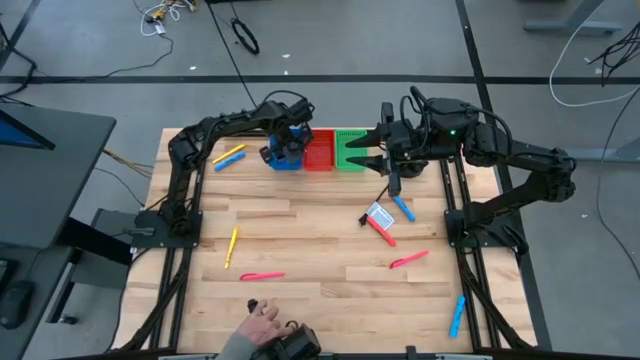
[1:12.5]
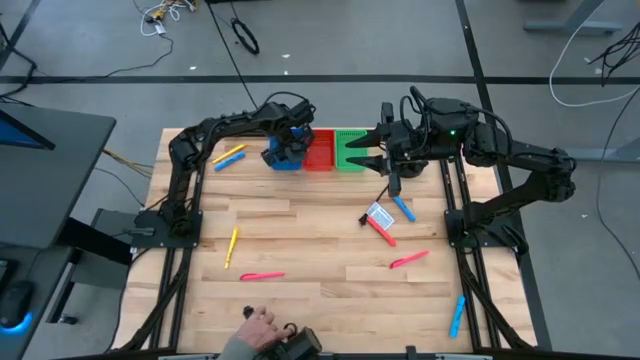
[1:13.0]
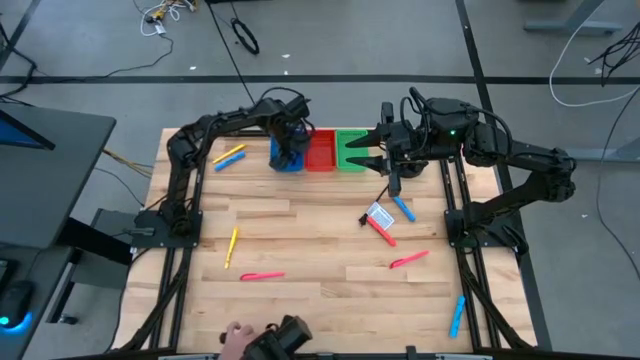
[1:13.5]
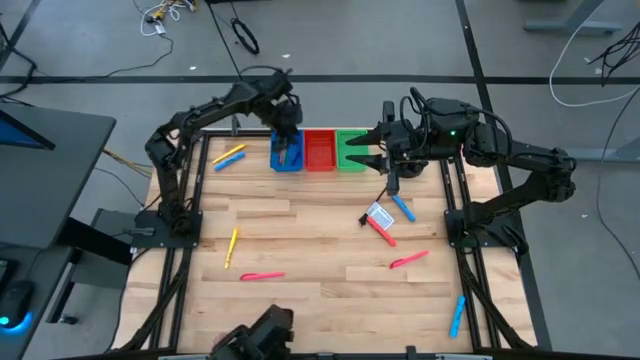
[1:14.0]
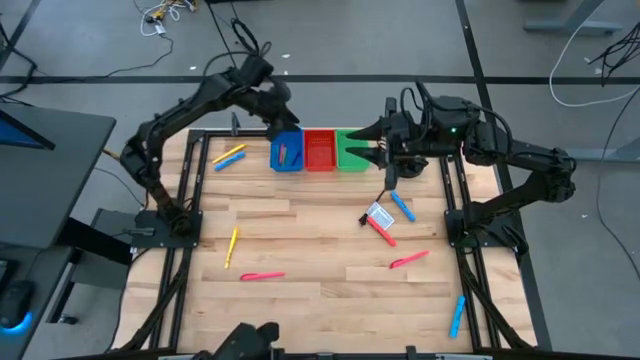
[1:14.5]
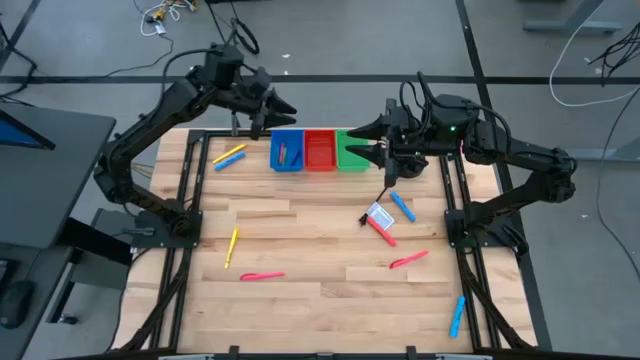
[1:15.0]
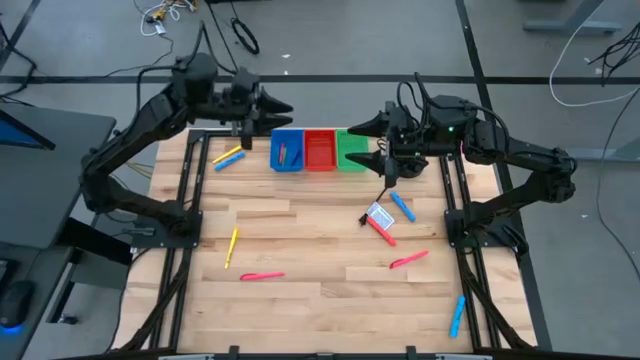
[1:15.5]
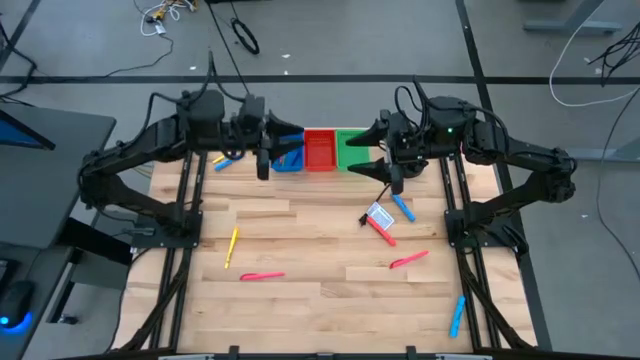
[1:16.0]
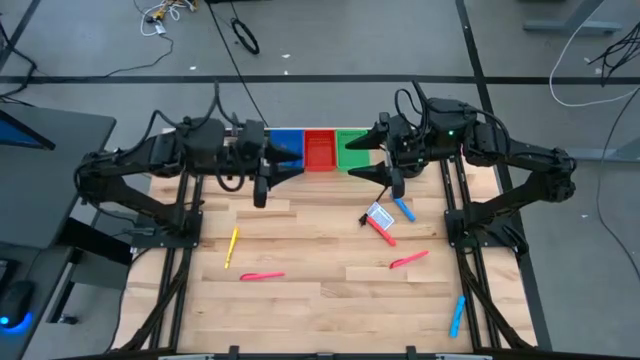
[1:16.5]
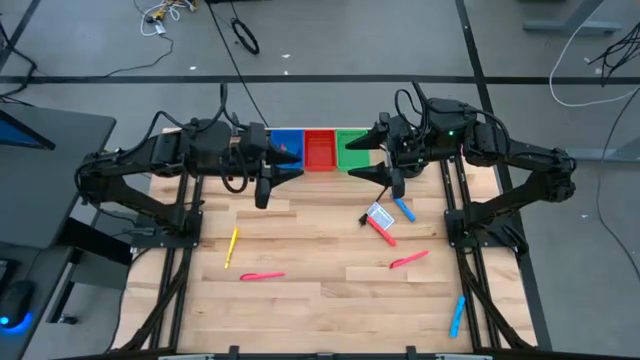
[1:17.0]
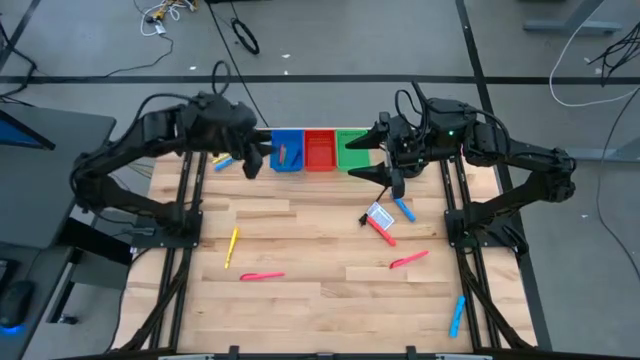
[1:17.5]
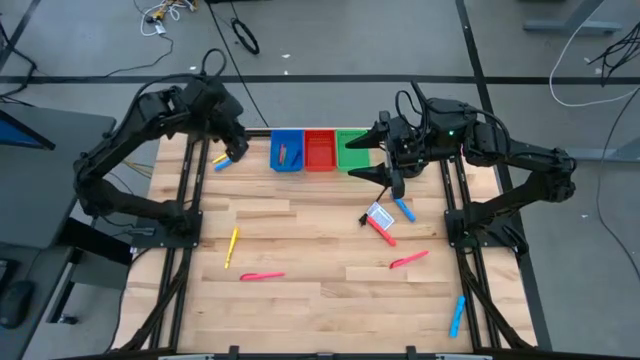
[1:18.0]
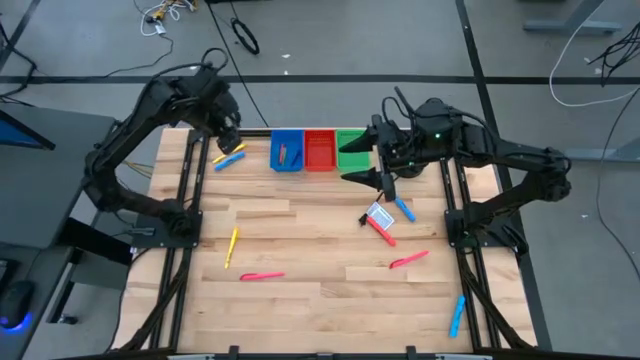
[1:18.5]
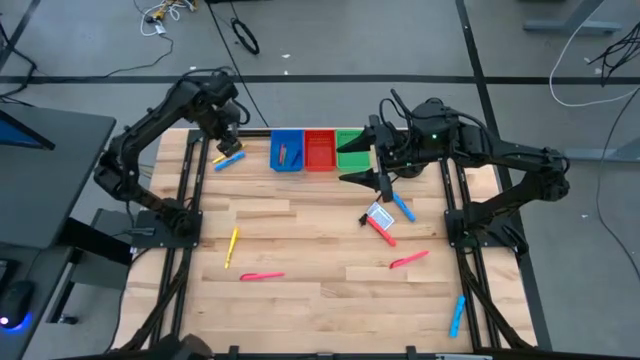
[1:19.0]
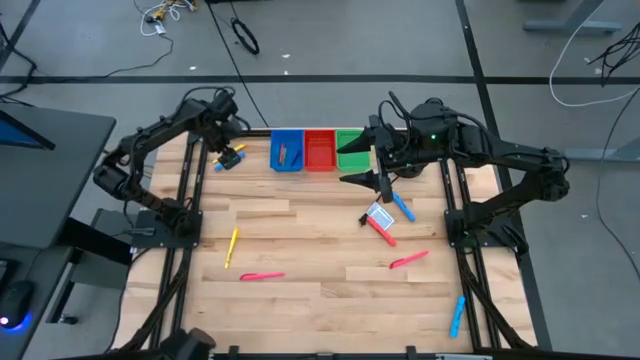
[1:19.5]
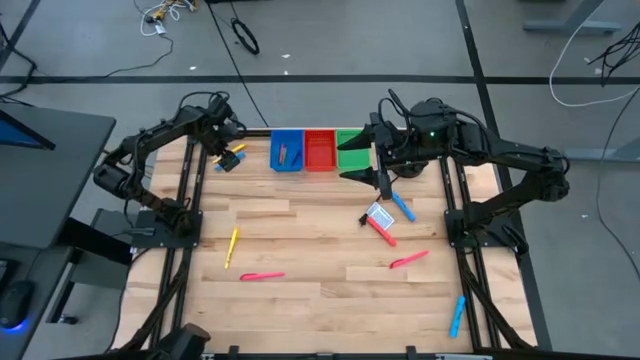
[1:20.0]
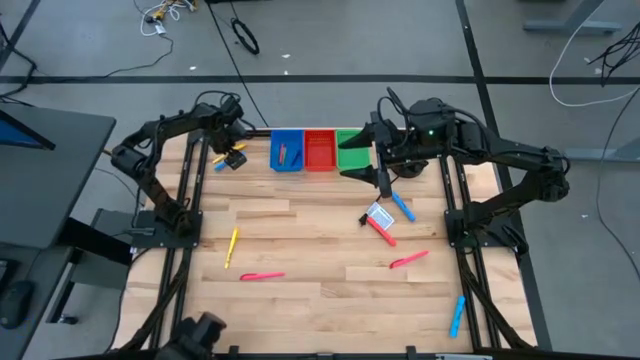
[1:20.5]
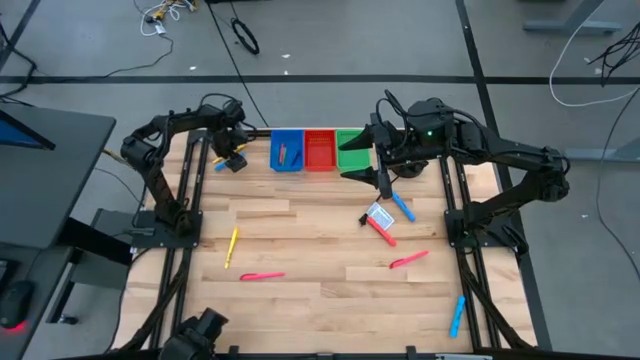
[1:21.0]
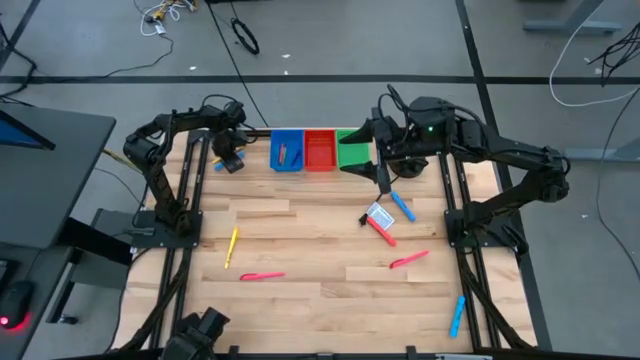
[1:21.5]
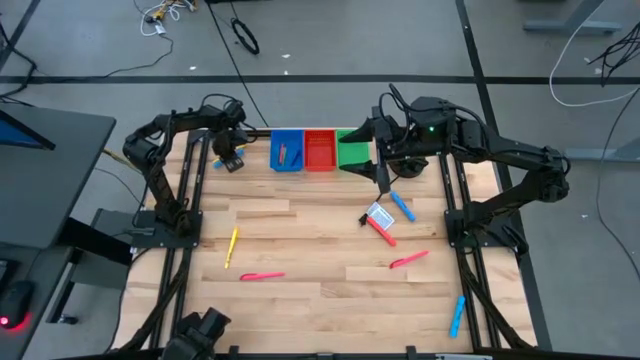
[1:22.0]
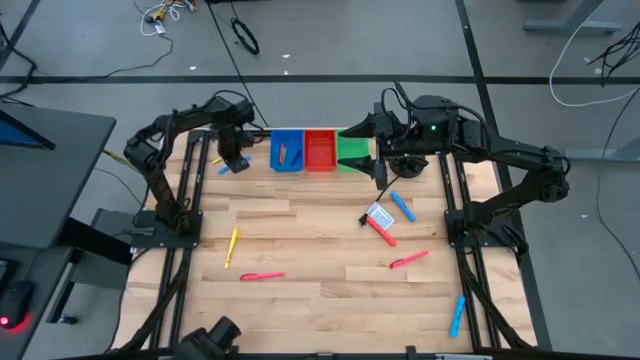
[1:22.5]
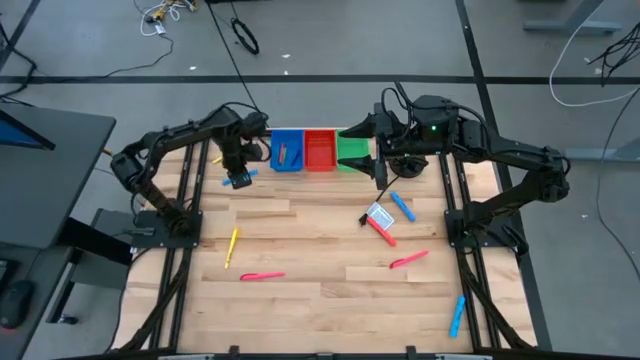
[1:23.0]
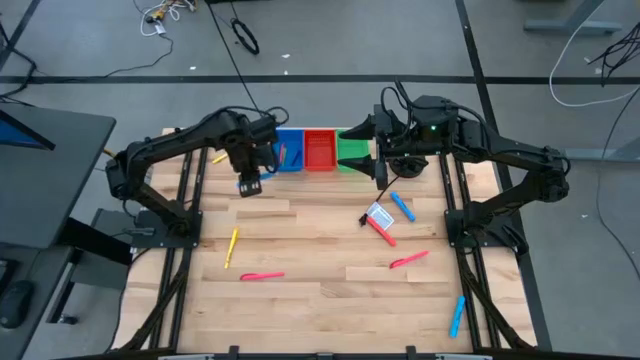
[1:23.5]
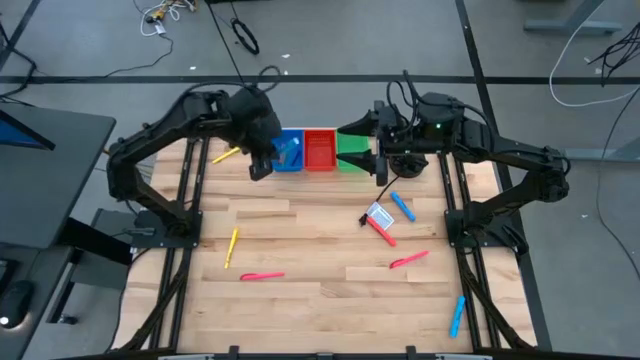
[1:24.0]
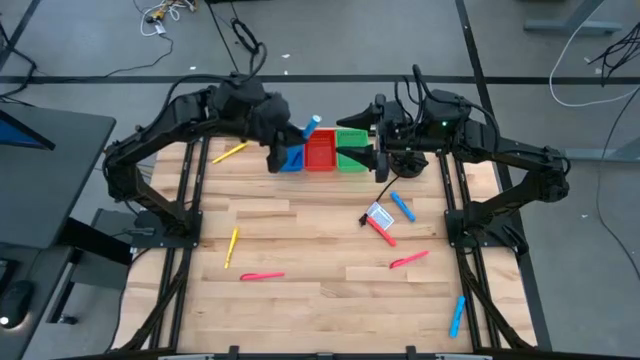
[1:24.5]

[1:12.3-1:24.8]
Task: Pick & Place Markers
Put the top left blue highlighter into the green bin

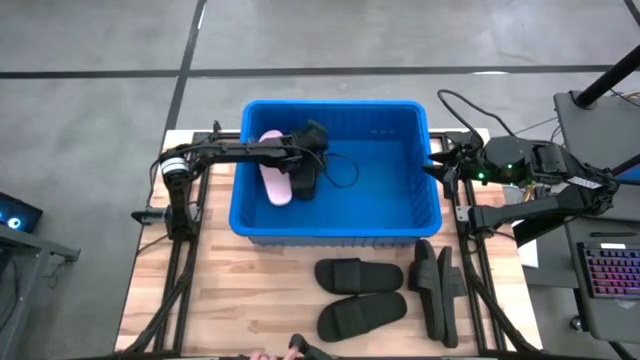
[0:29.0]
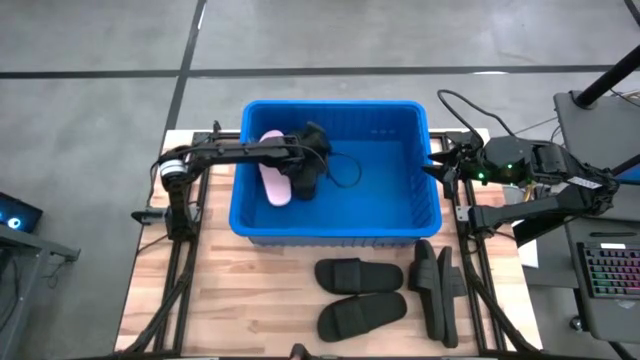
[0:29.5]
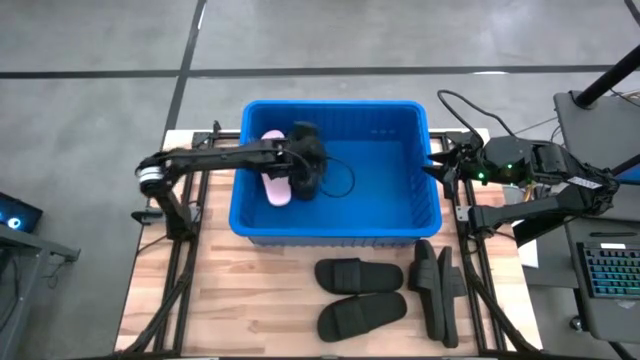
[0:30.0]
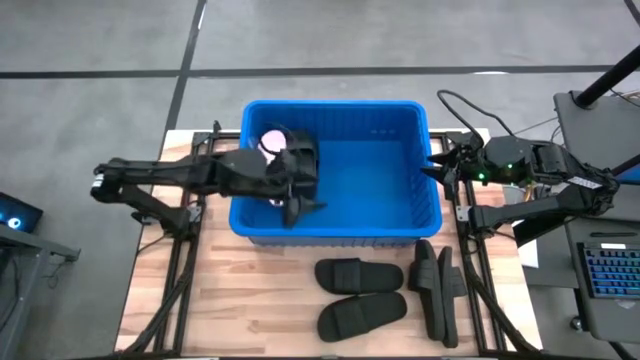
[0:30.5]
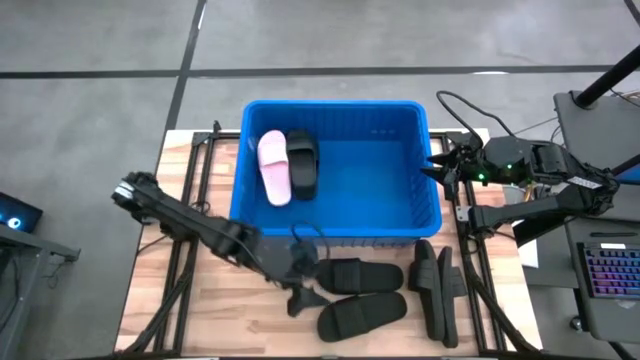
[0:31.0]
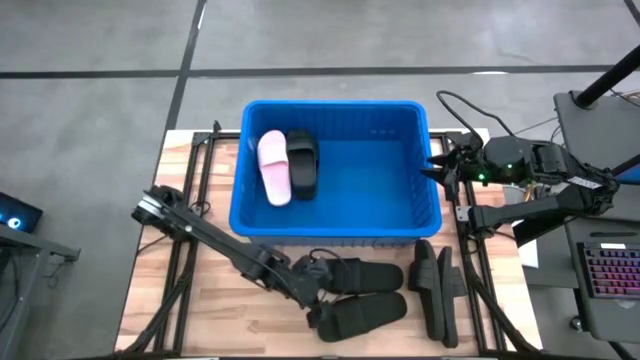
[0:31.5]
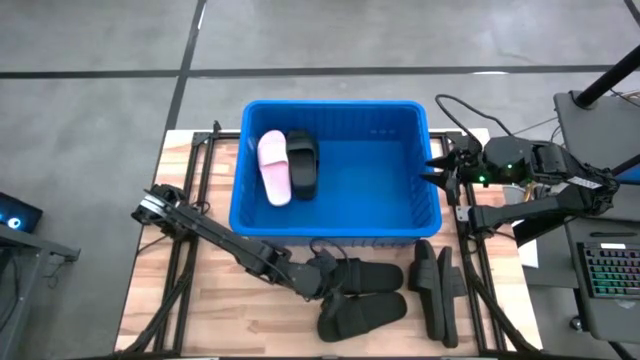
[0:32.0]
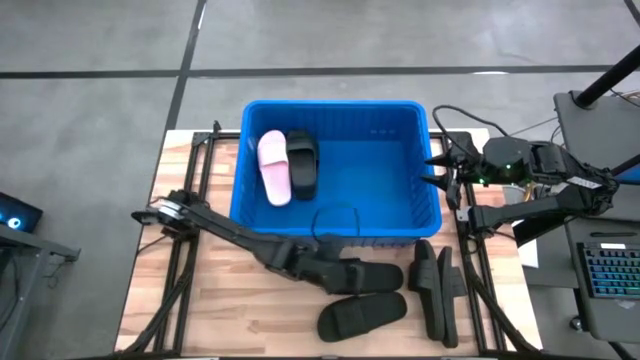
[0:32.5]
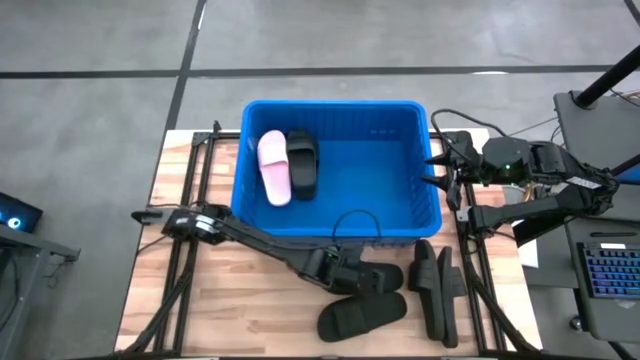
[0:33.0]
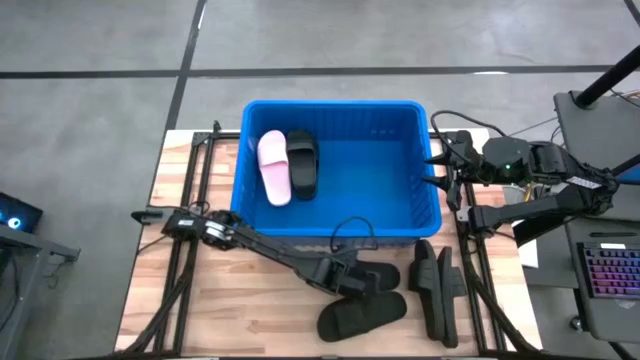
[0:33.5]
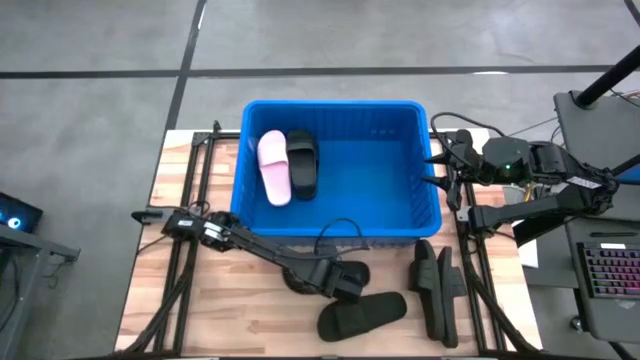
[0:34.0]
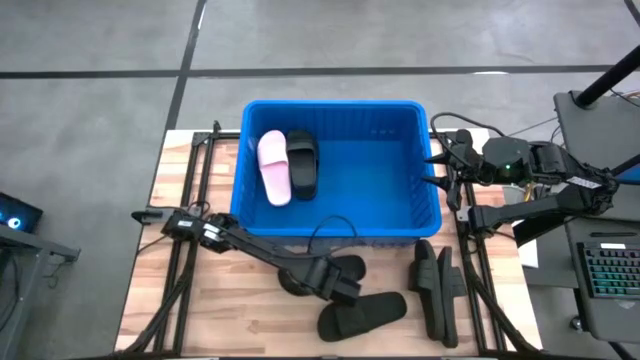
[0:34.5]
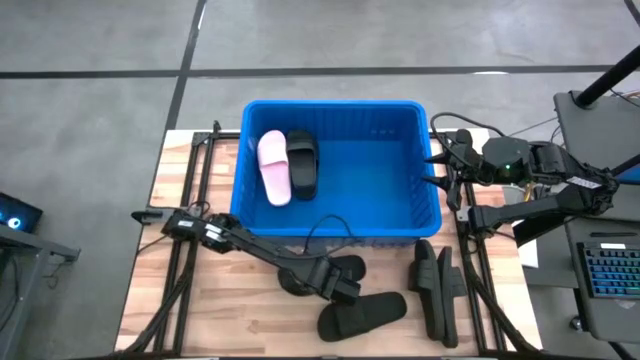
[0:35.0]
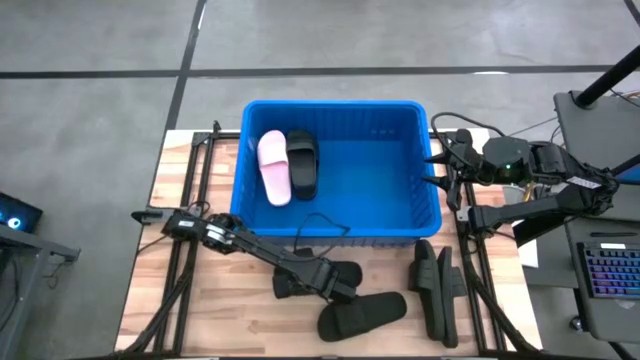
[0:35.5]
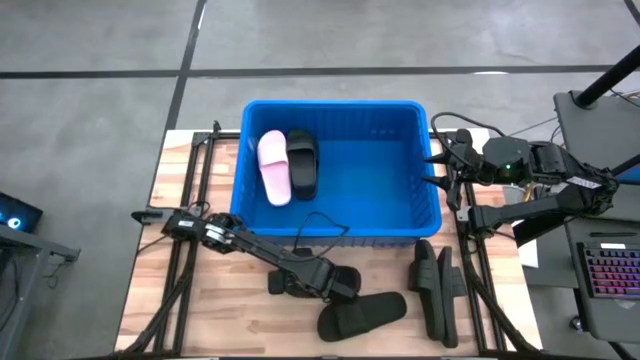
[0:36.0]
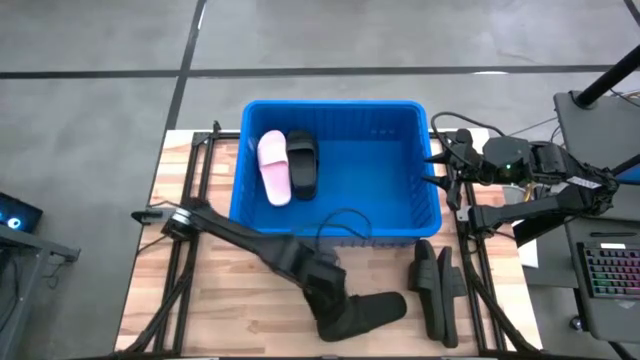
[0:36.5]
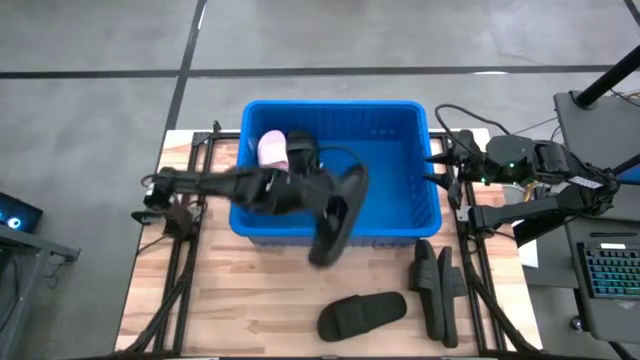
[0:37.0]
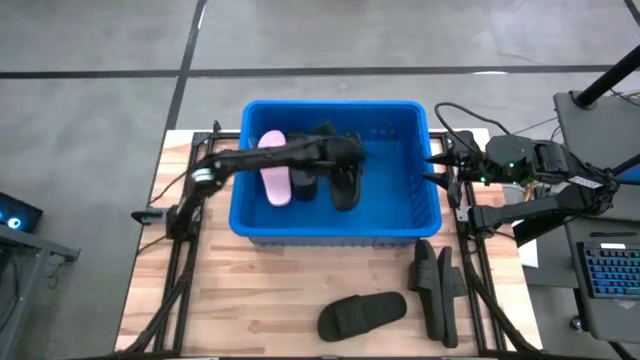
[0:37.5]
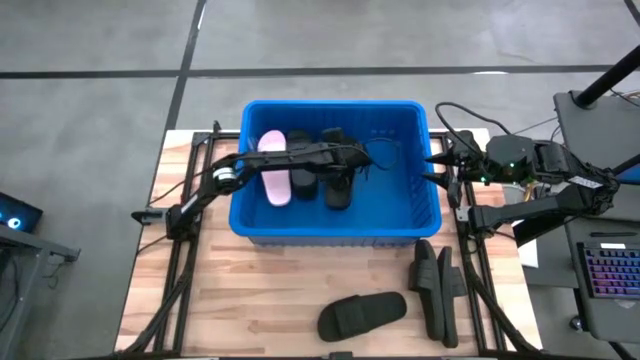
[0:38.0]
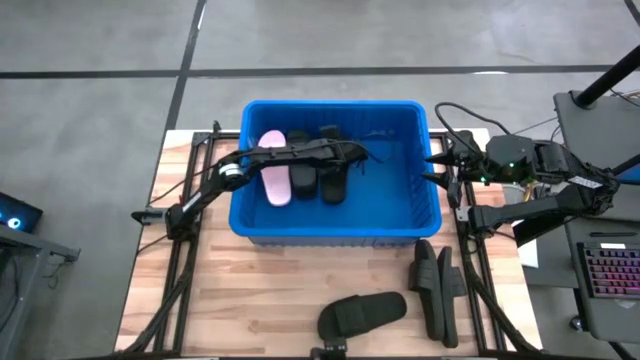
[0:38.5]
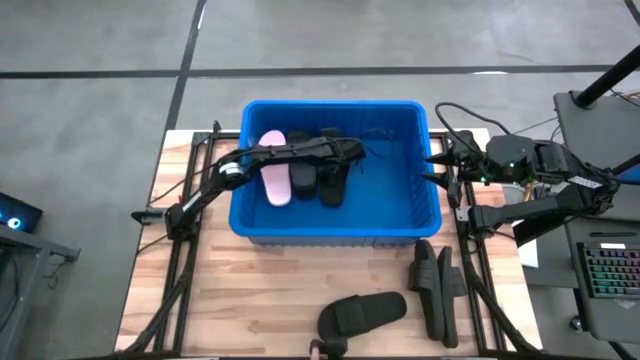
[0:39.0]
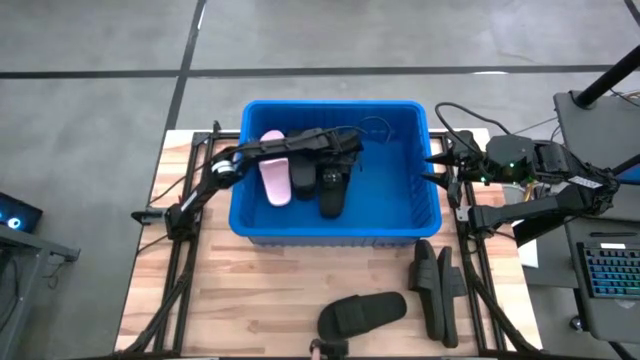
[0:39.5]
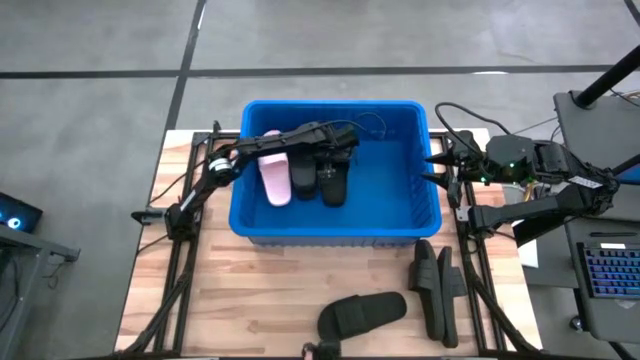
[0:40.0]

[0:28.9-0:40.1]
Task: Pick and place slides into bin
Put the black slide into the bin
